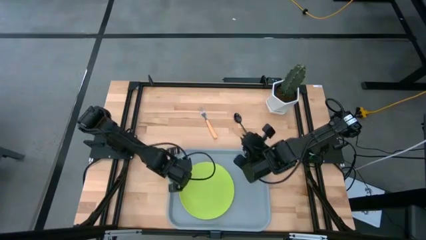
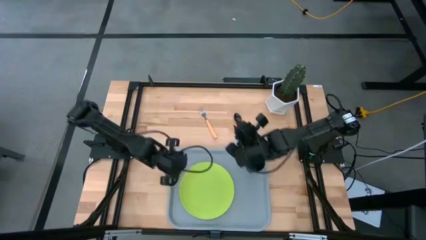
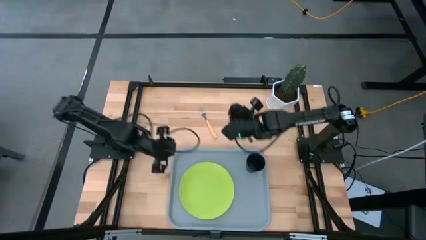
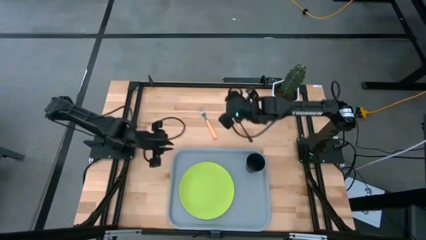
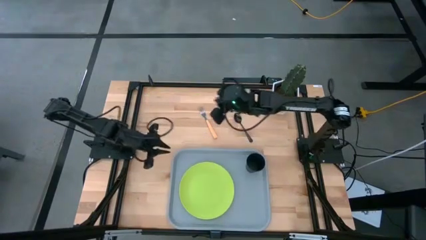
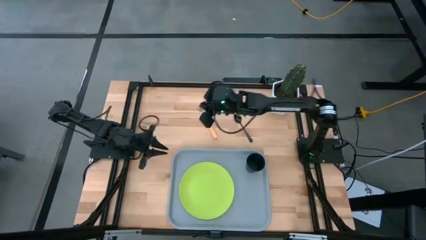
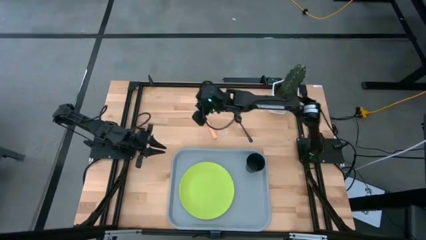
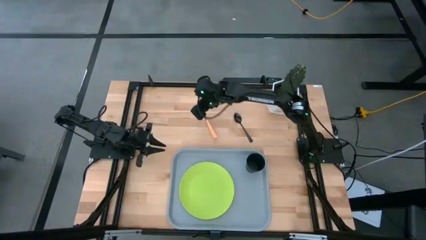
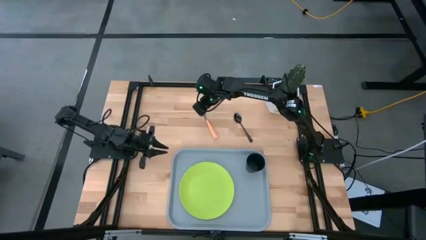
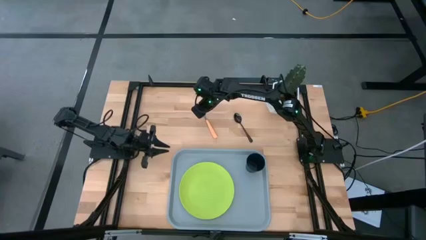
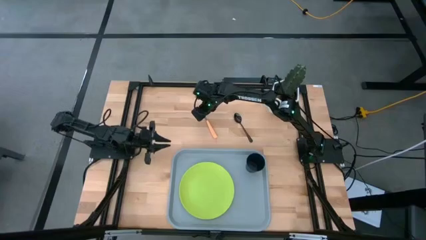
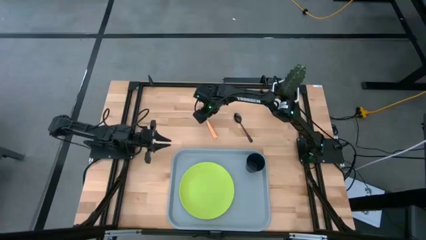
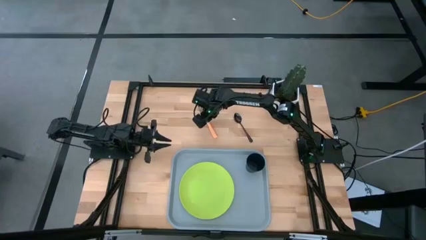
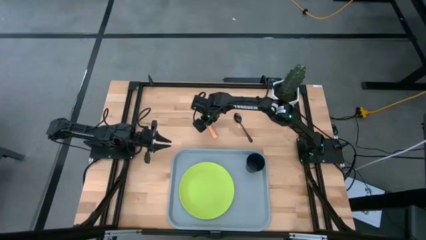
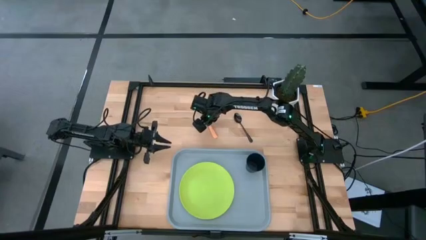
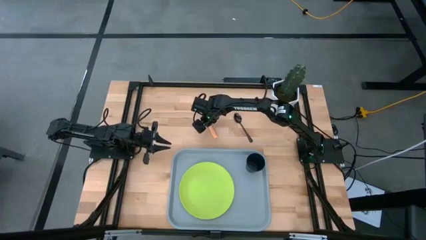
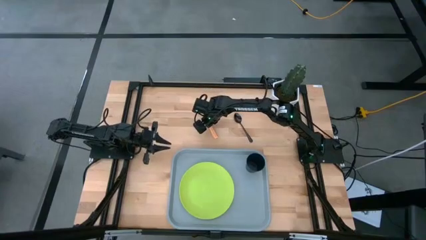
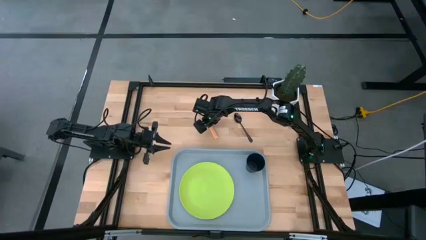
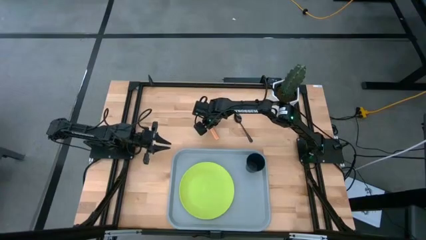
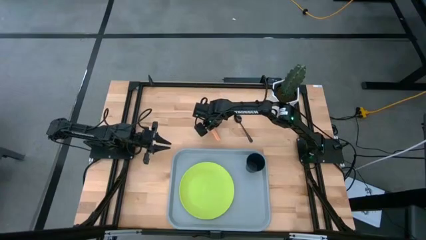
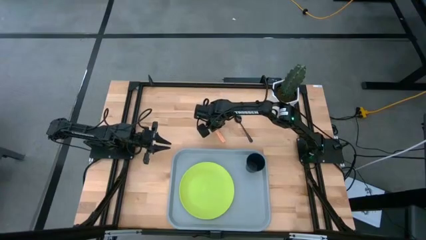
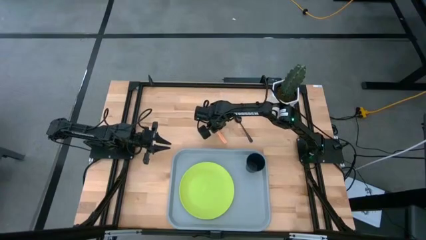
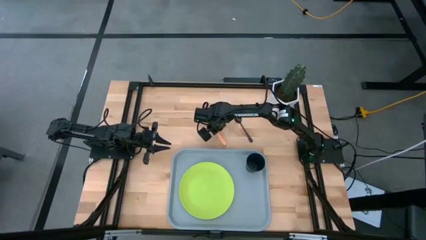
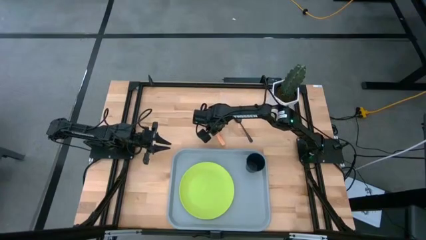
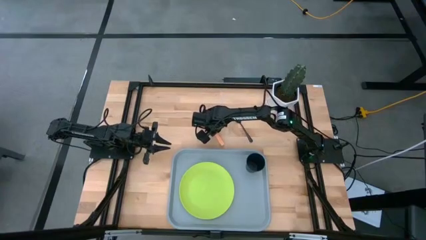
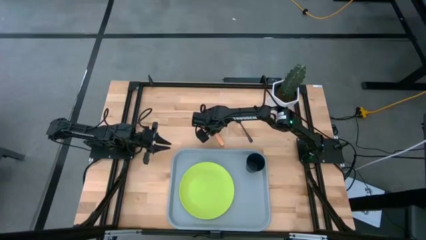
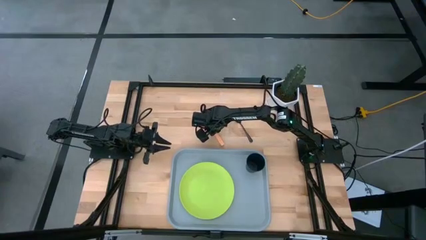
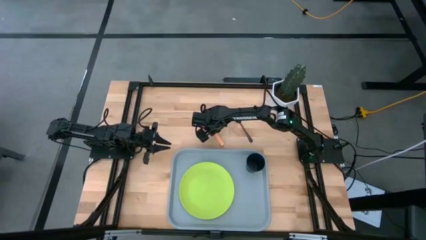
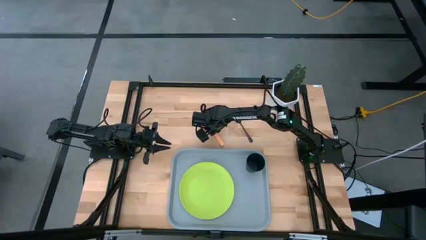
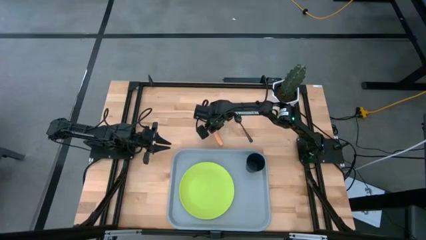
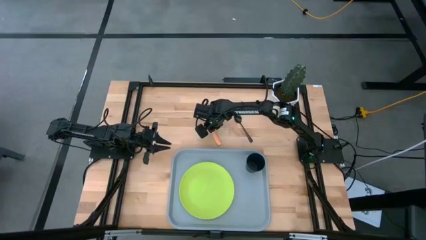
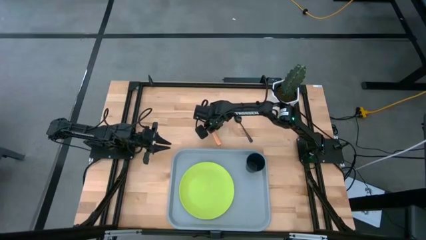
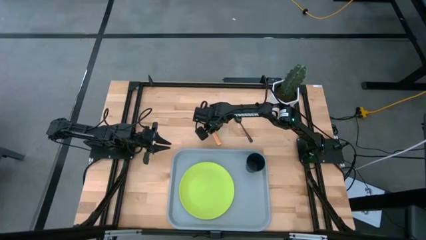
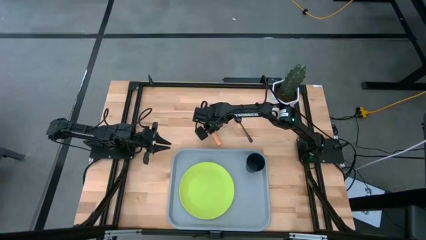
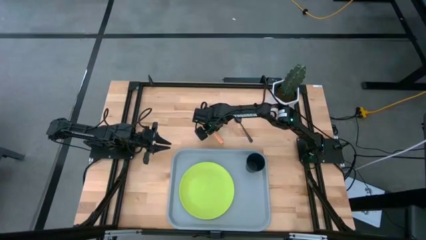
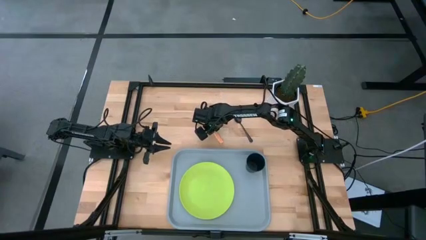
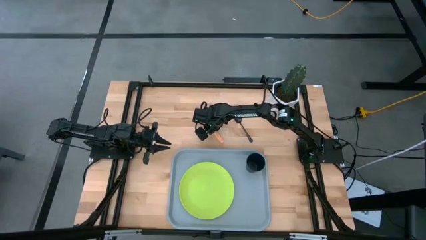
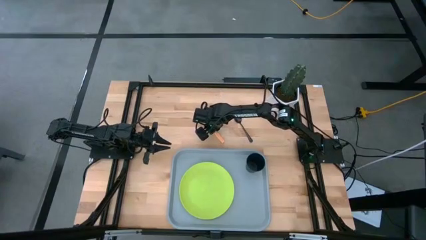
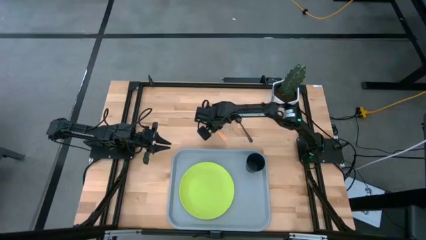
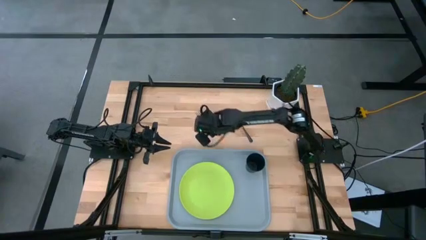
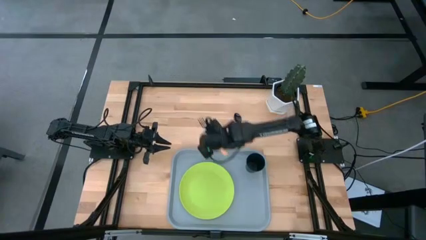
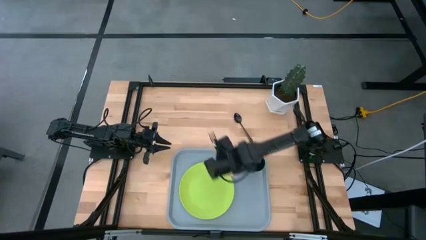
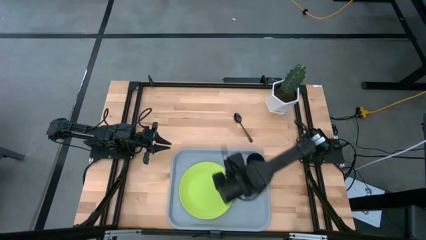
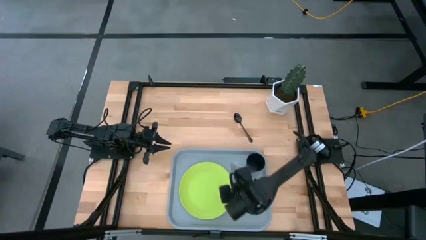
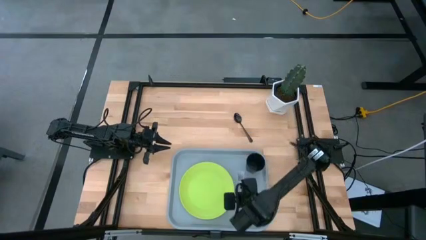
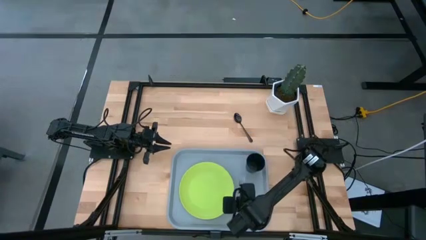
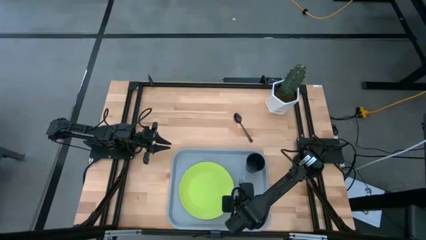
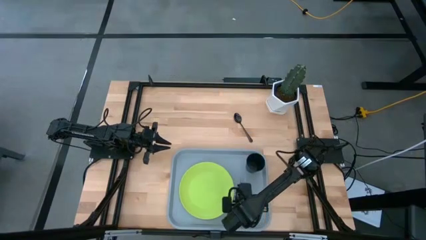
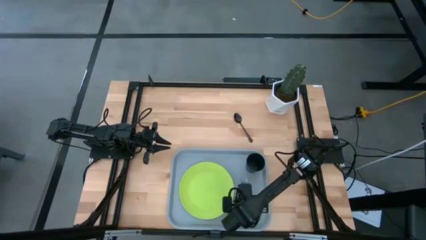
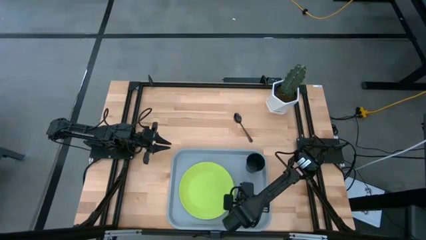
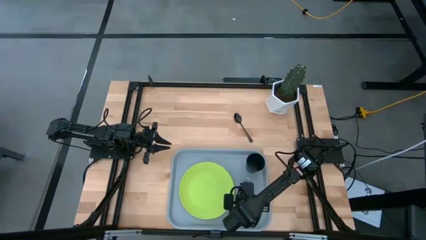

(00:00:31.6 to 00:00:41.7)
Task: Pick and place plate/cup/fork/spoon on tray
Put the orange fork beside the green plate on the gray tray

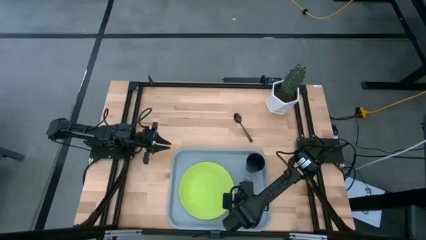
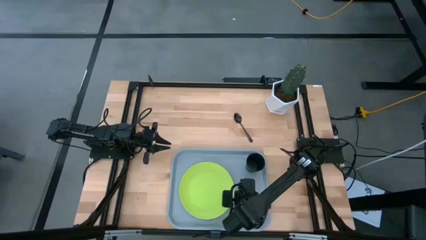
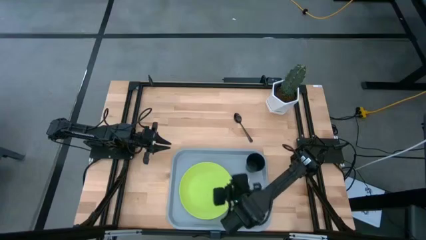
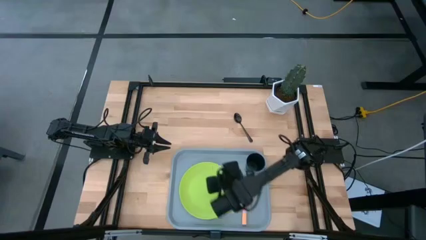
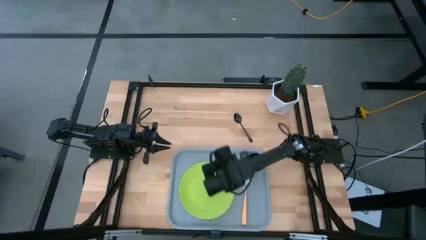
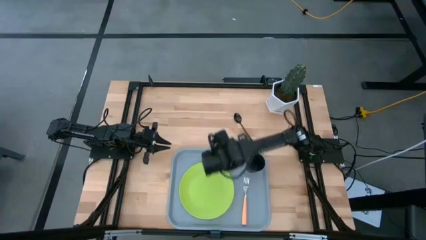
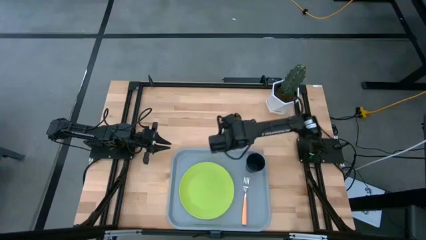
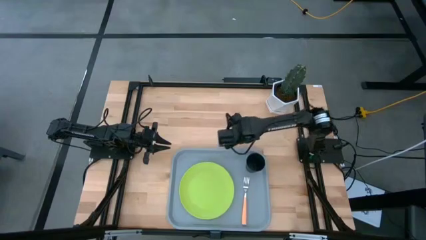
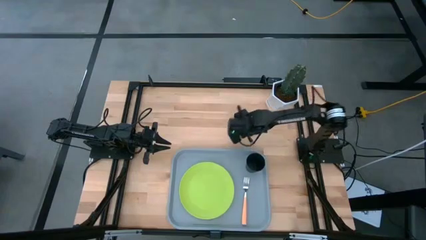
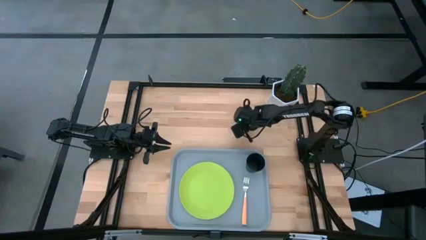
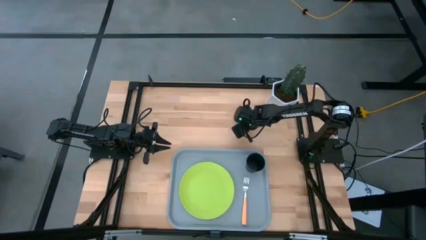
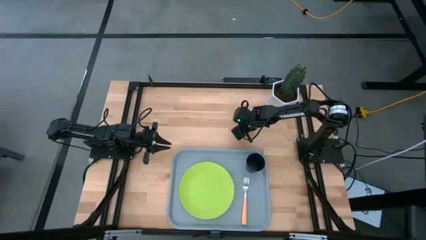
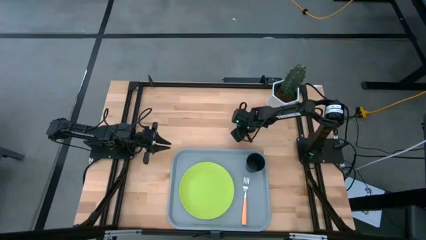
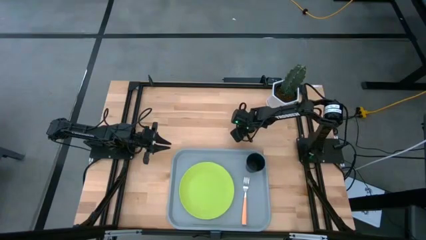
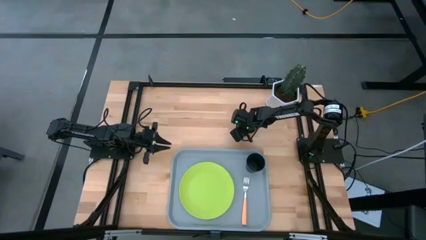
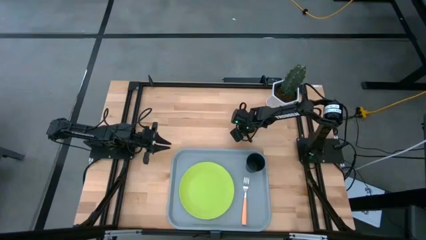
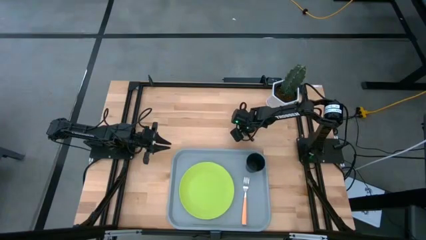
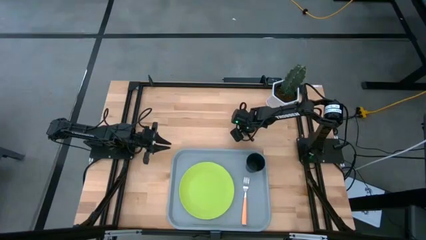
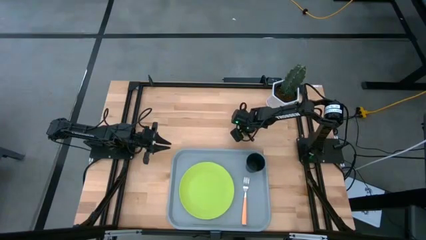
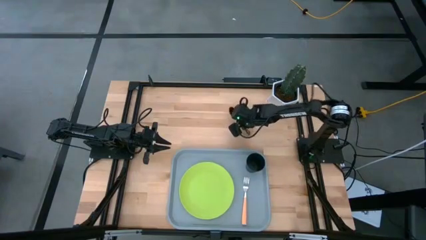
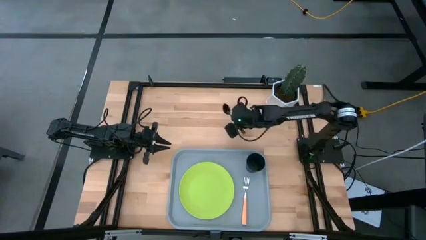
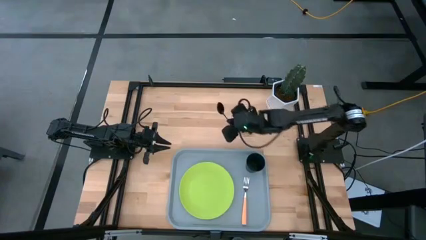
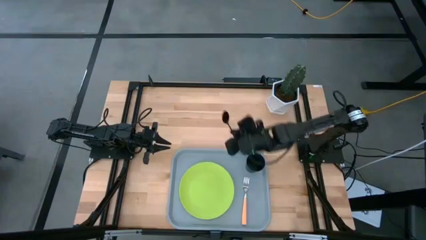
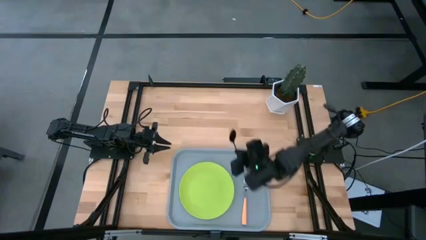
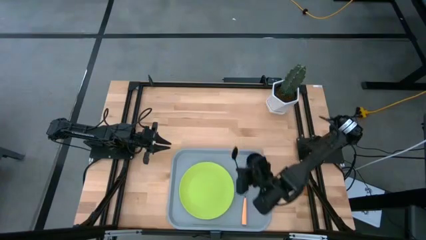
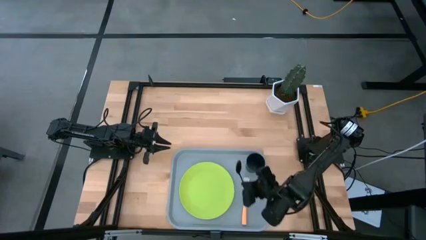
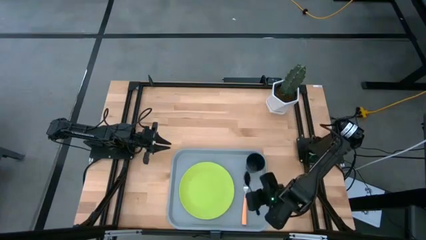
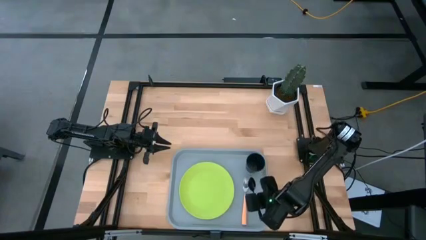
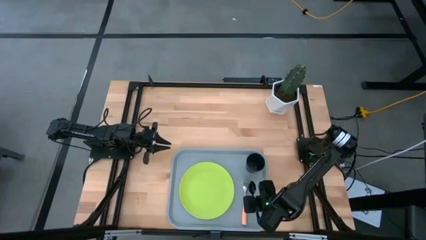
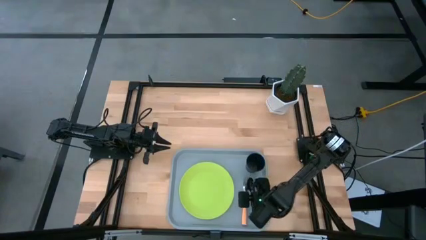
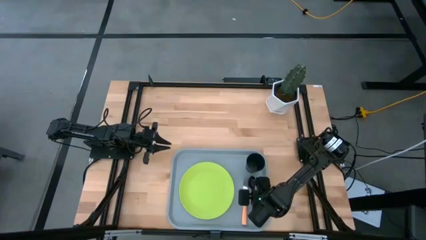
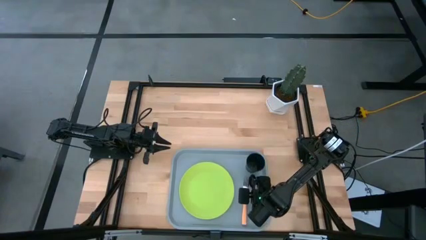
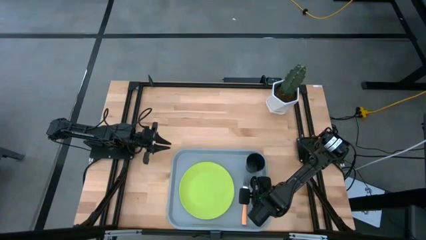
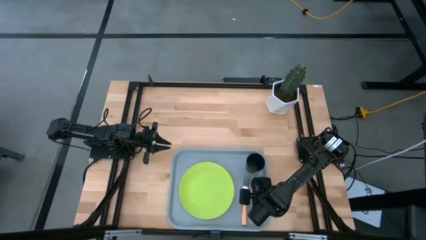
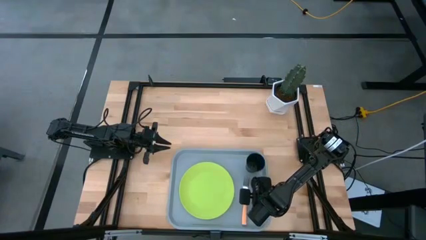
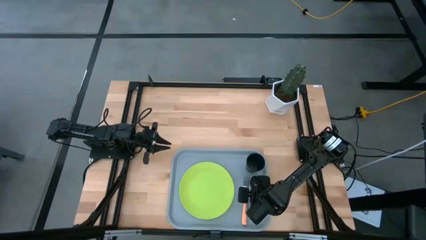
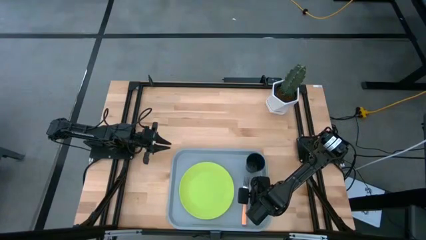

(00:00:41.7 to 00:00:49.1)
Put the black spoon beside the orange fork on the gray tray
